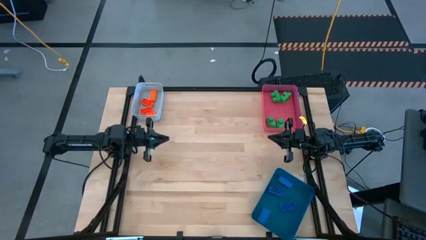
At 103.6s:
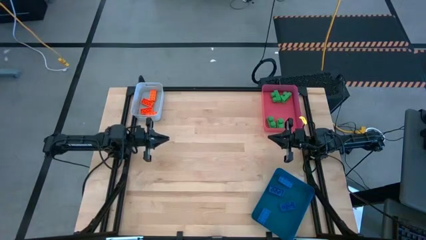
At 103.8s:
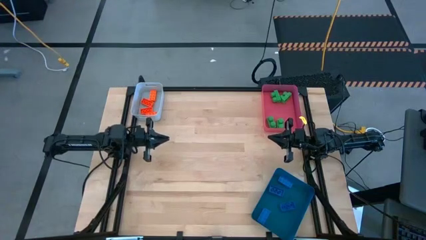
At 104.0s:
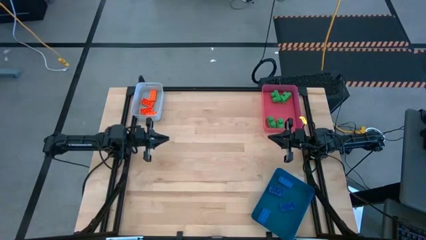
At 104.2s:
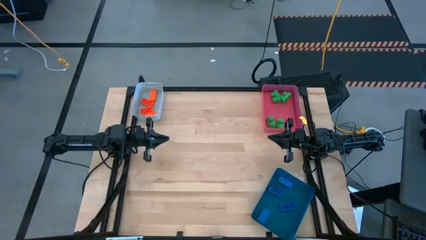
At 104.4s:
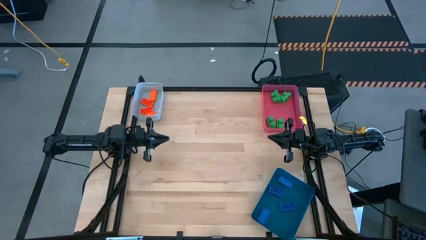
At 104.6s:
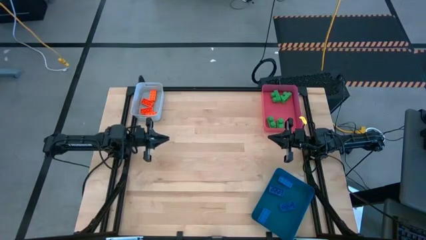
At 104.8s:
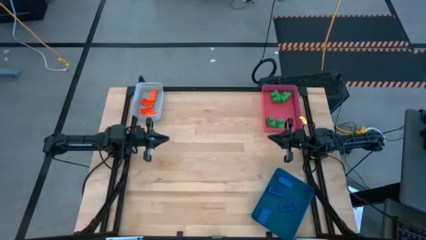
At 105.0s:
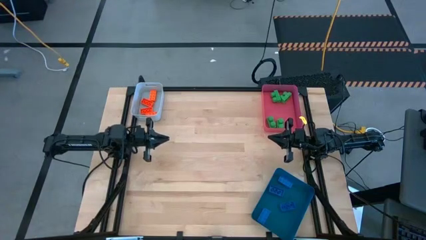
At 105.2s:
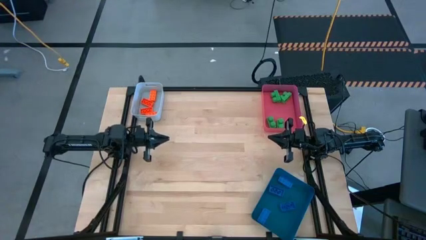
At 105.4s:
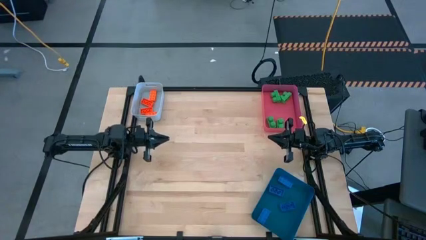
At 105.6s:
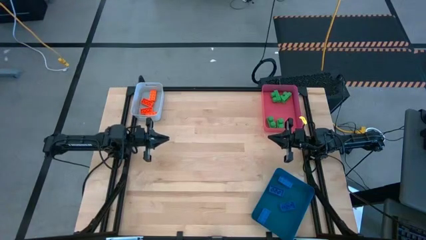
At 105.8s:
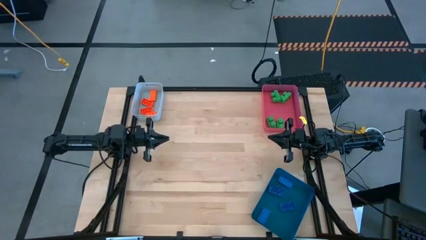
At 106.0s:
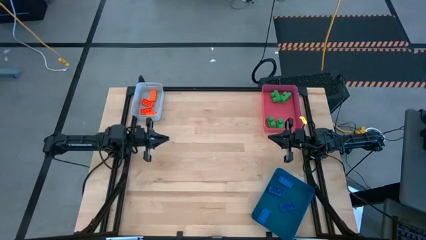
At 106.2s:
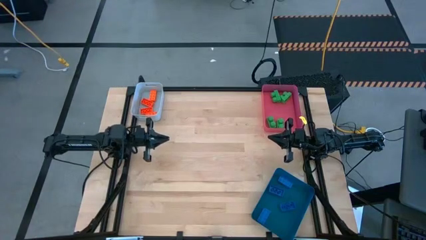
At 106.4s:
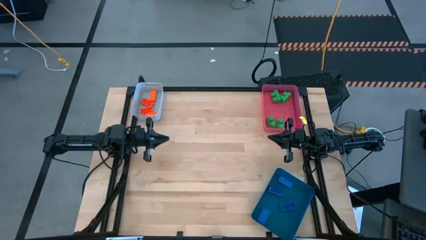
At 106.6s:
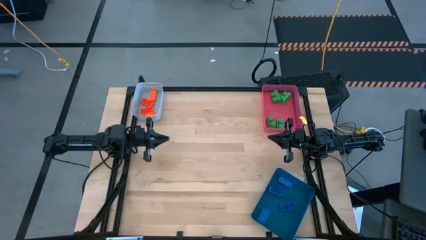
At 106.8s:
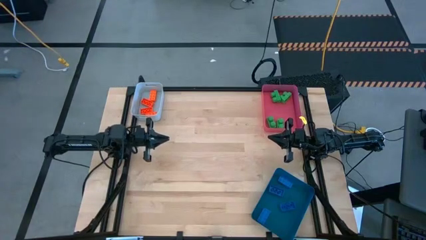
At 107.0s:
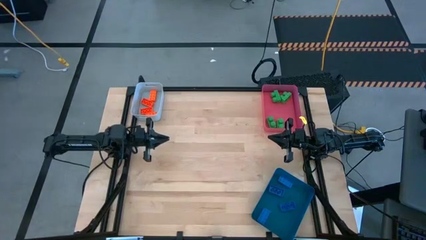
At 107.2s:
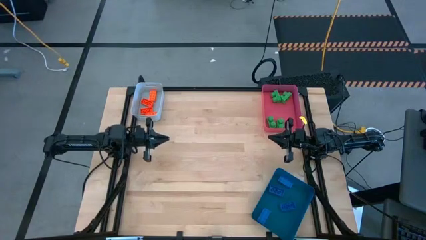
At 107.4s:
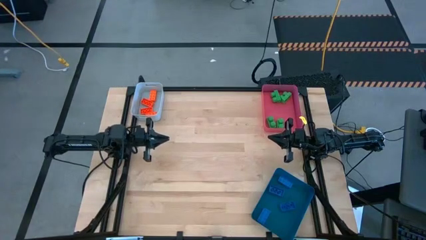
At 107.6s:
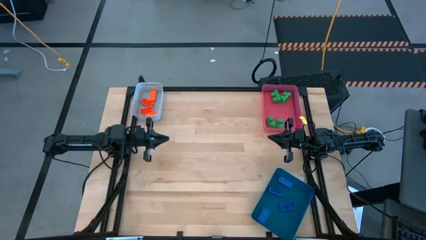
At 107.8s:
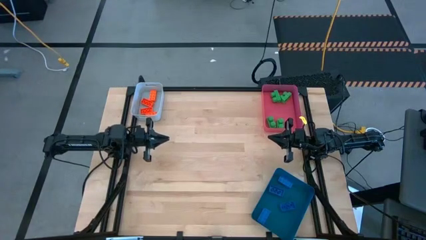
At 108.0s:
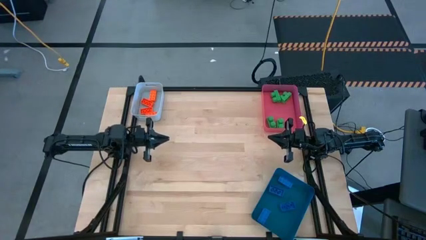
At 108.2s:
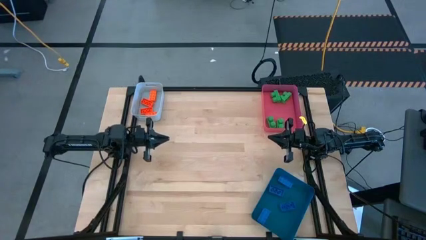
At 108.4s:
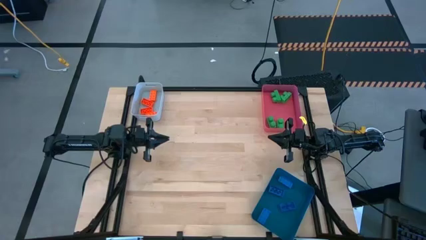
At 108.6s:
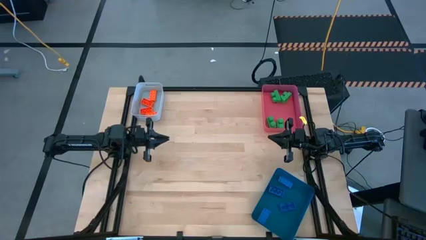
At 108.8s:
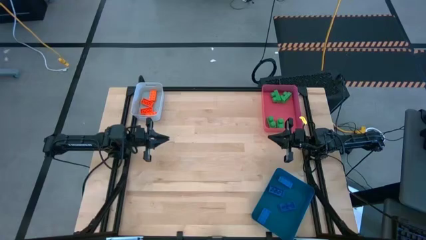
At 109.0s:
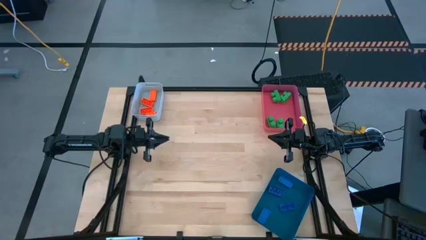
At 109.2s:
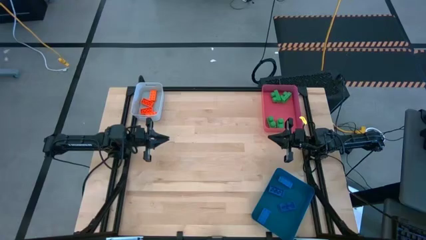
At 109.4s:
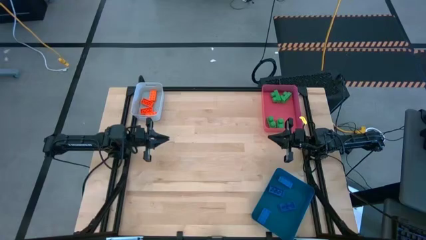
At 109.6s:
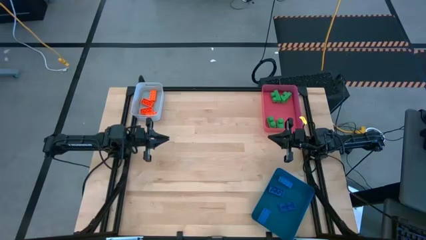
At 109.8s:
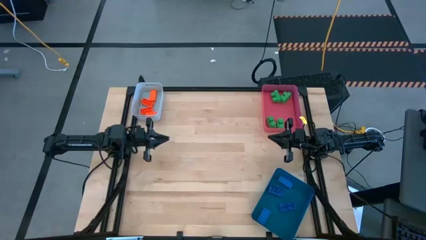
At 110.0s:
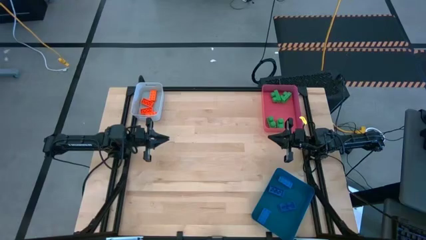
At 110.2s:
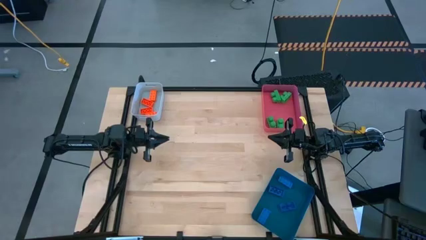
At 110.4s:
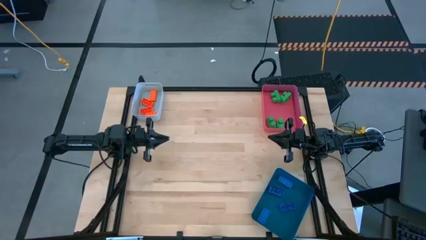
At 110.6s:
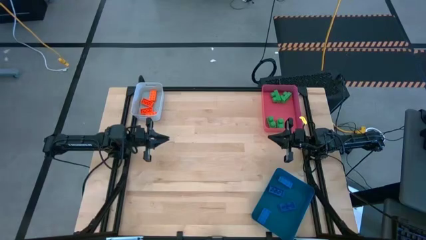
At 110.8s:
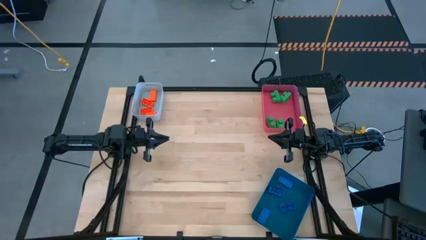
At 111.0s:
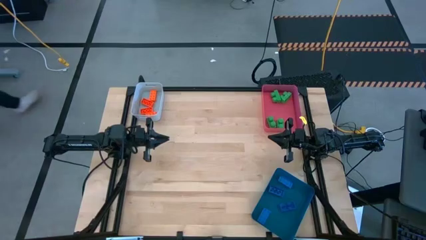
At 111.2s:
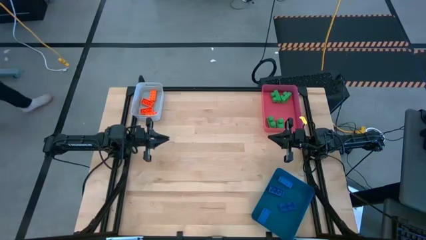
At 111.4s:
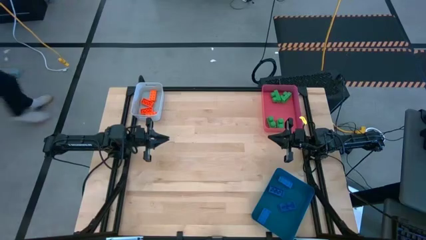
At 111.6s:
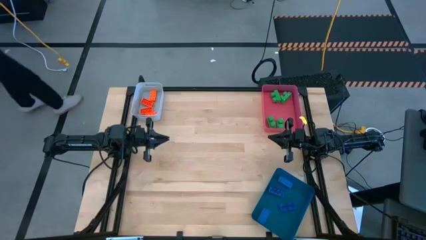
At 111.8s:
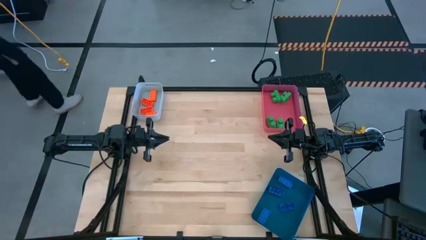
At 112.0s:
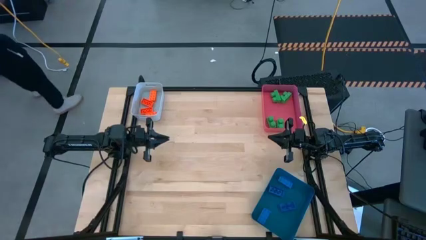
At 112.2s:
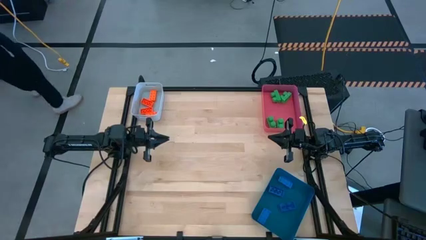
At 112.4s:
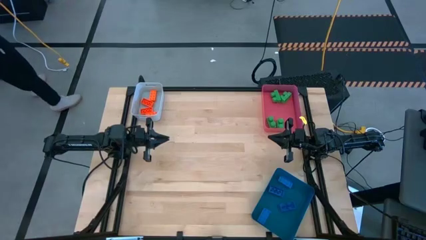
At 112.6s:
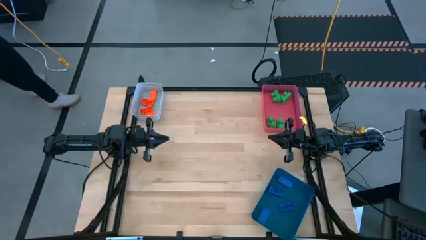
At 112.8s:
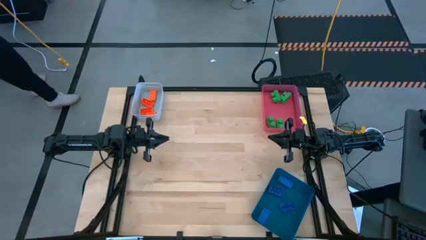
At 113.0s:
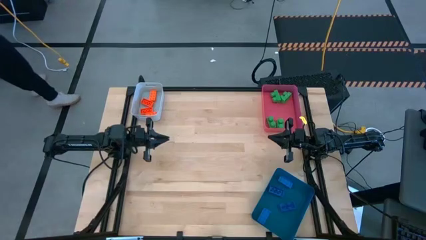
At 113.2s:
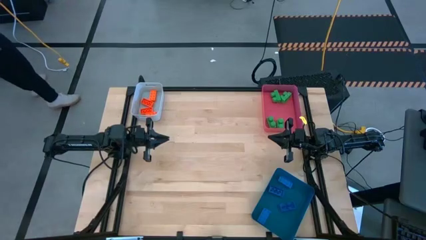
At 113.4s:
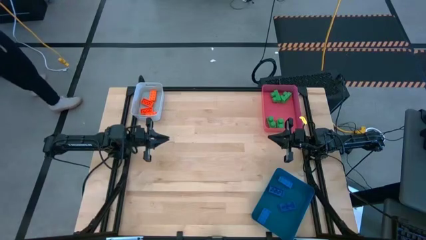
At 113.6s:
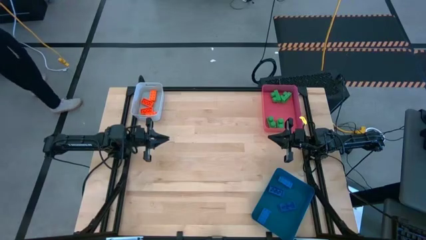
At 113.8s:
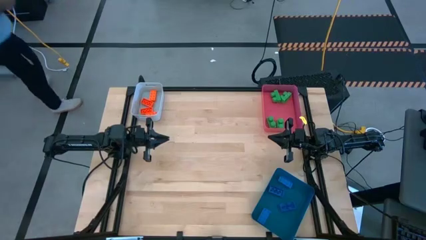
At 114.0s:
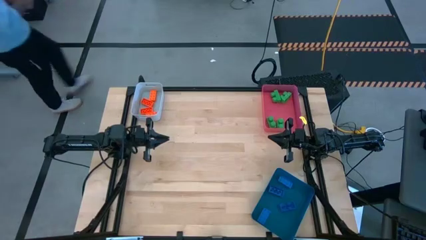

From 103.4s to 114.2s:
Task: Sort & place blocks by color
Return to Home Position

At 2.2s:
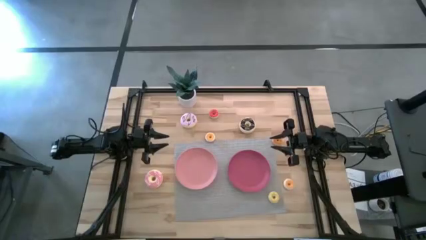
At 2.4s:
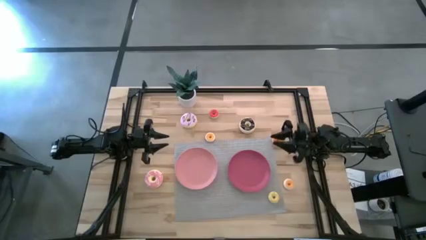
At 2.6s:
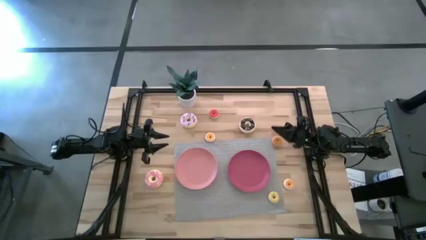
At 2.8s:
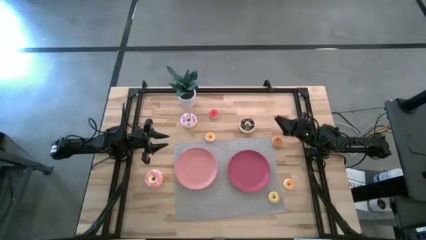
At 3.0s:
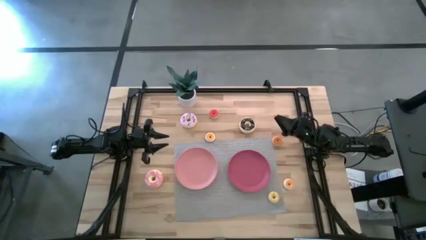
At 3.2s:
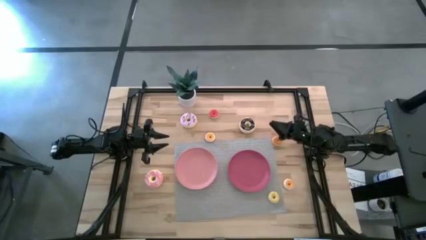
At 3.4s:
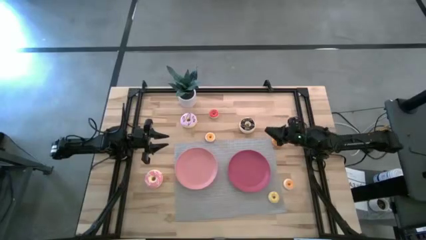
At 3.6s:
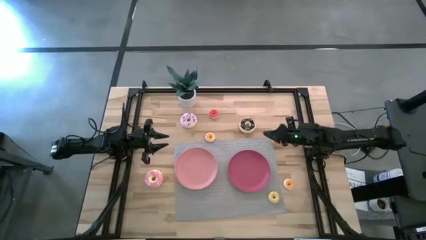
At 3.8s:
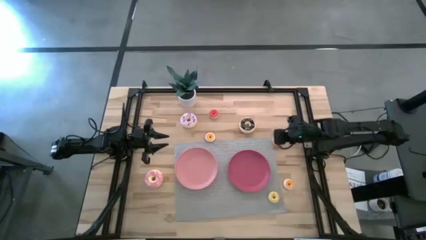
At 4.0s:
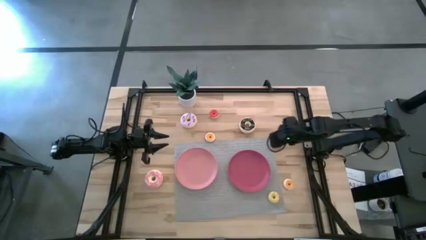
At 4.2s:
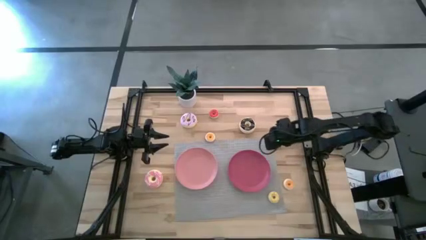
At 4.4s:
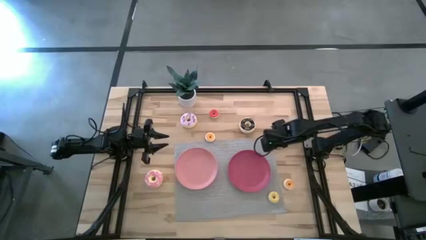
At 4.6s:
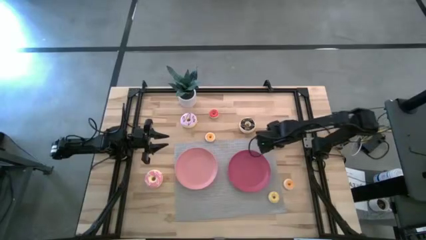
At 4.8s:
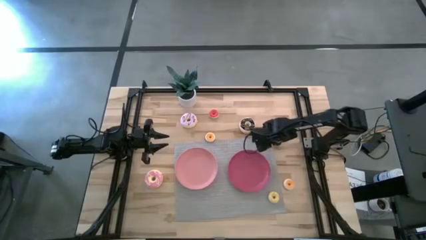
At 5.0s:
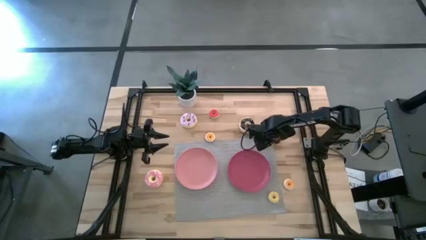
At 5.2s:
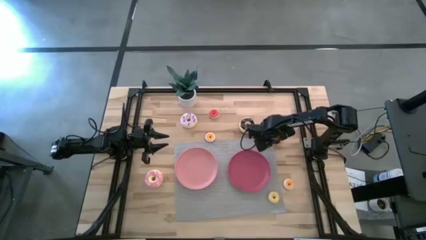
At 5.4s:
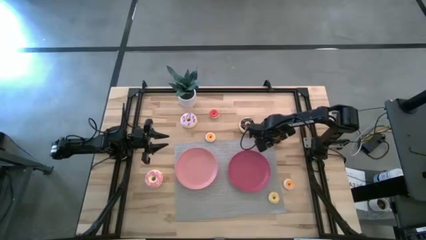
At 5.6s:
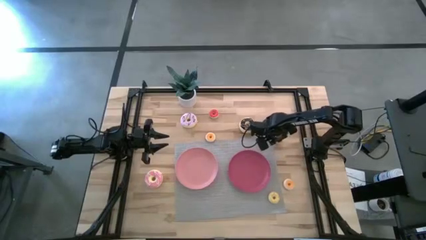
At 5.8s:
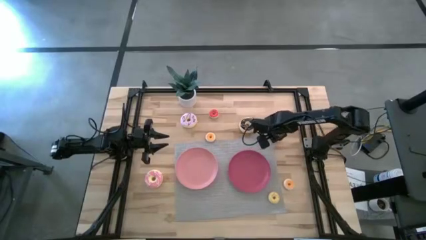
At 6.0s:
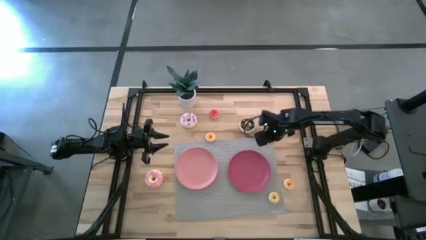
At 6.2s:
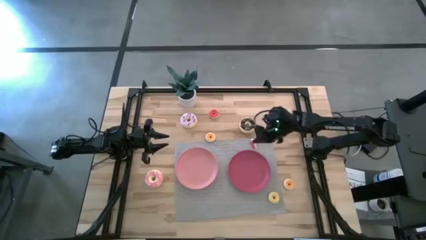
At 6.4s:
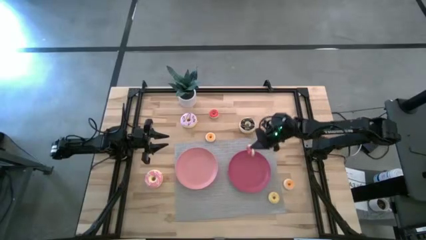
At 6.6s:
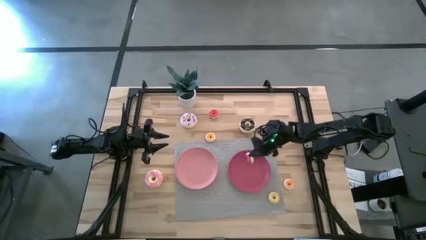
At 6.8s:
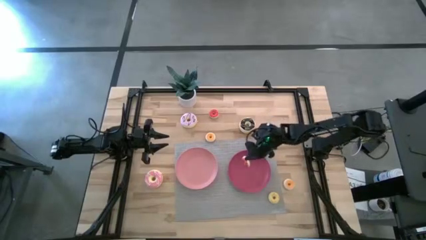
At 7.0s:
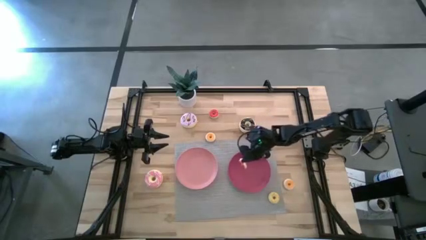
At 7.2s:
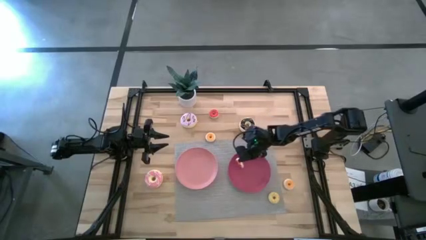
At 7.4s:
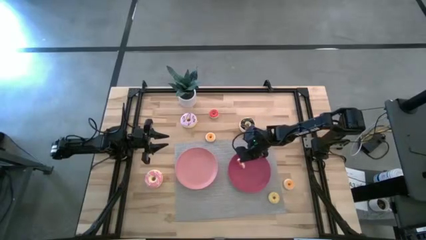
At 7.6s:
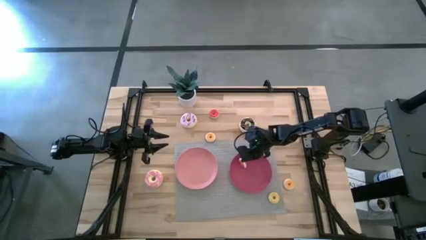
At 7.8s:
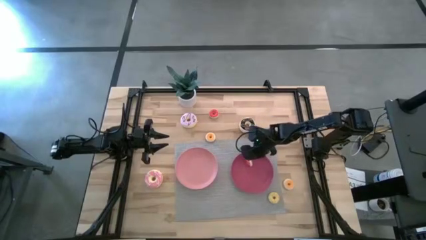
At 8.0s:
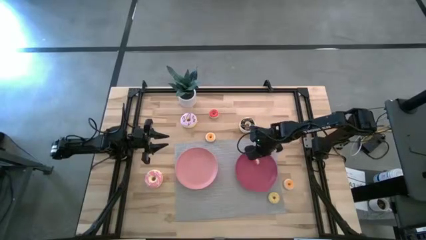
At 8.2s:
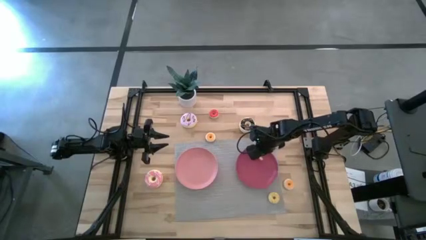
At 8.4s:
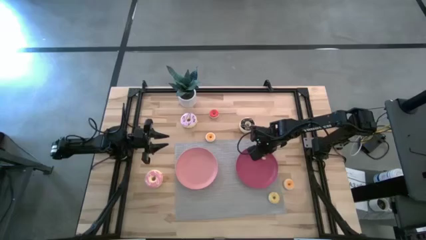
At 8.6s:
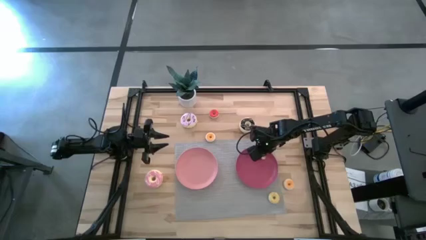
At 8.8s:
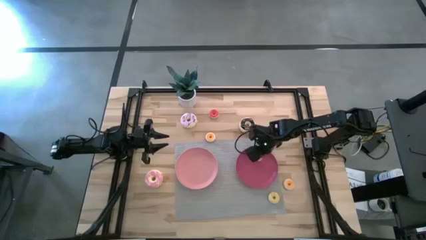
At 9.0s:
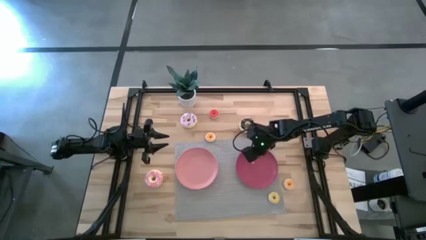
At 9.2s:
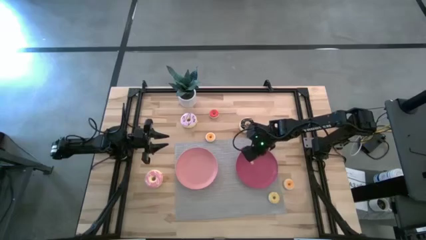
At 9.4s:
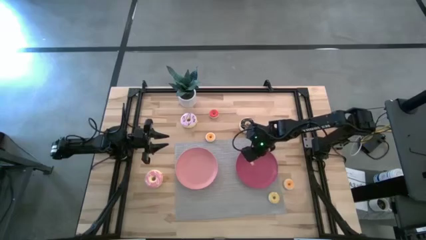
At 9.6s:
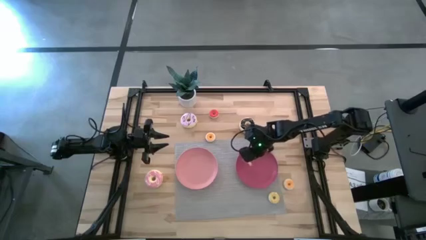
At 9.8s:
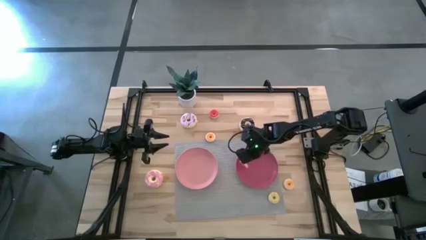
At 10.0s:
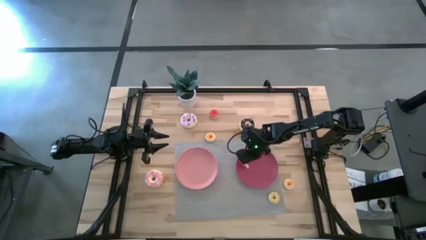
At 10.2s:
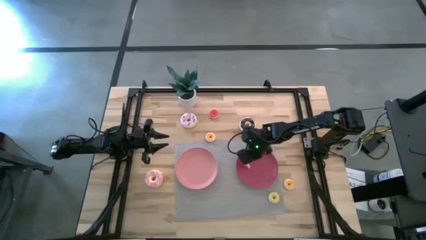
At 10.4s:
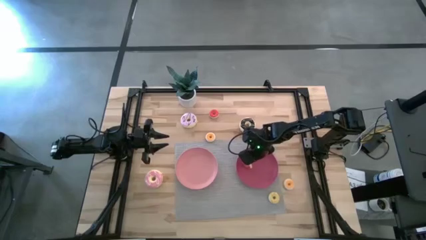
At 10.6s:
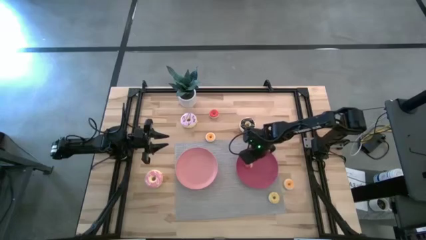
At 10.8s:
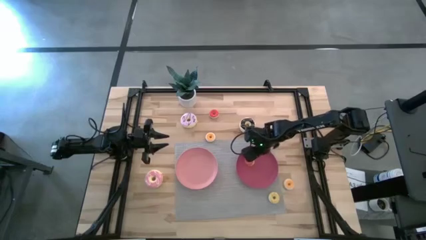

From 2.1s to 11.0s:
Task: Pick & Place donuts
Put the small orange donut on the dark pink plate
